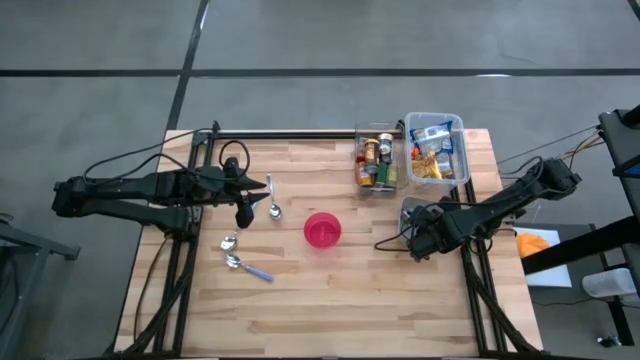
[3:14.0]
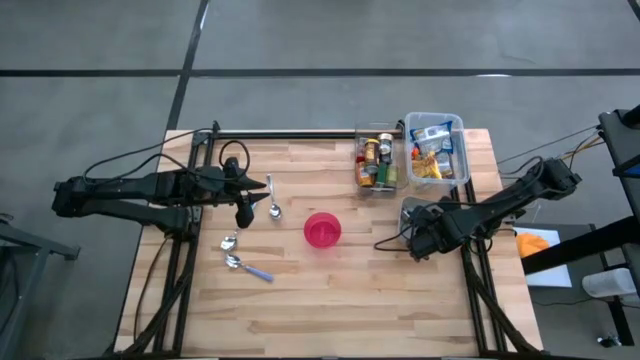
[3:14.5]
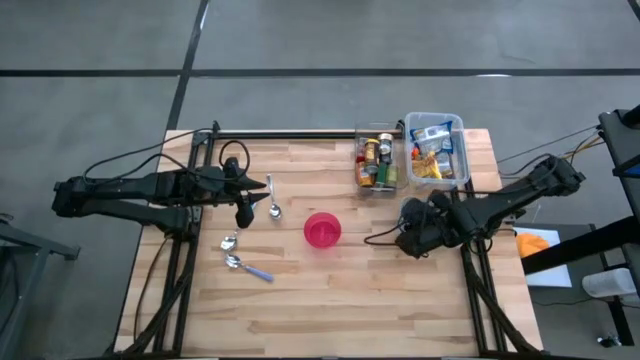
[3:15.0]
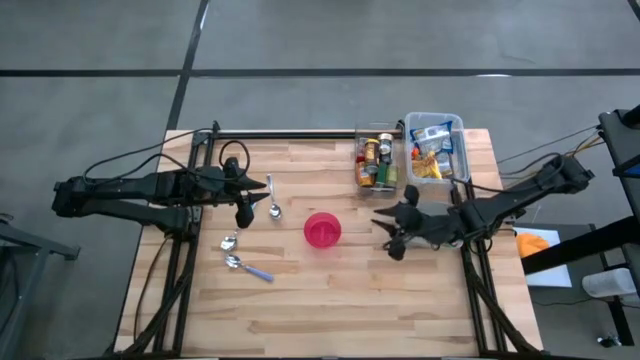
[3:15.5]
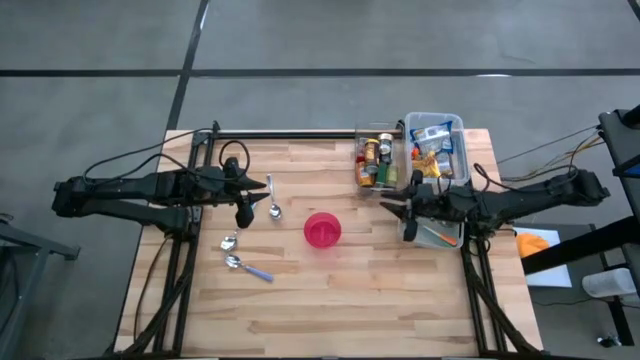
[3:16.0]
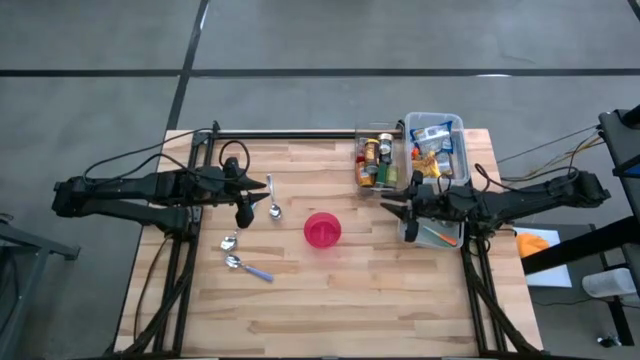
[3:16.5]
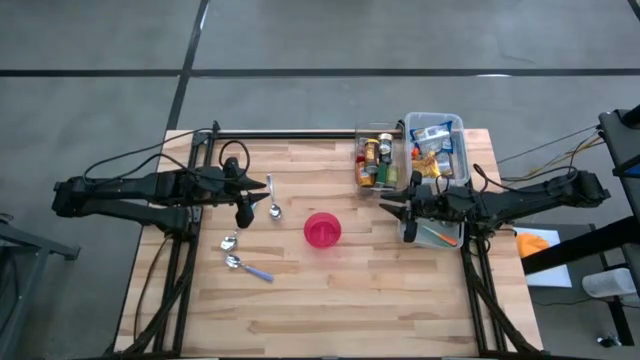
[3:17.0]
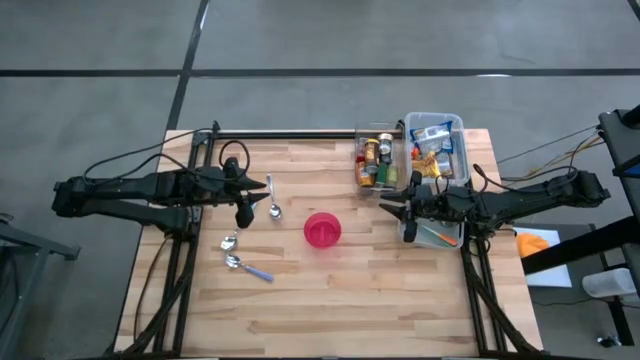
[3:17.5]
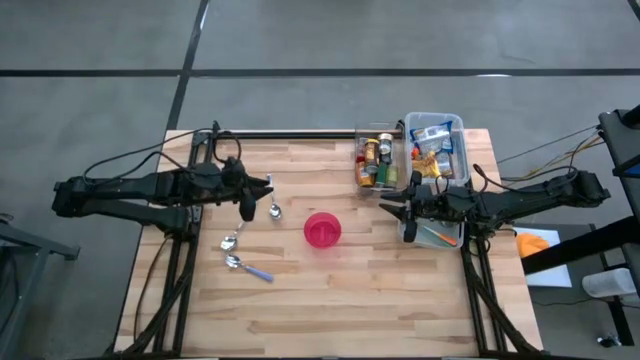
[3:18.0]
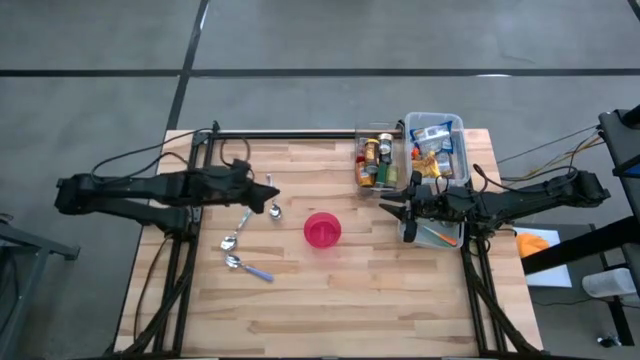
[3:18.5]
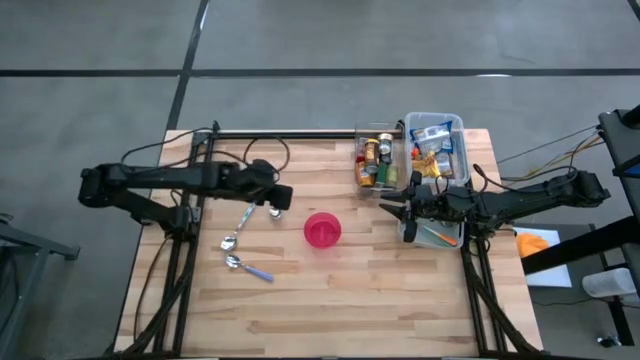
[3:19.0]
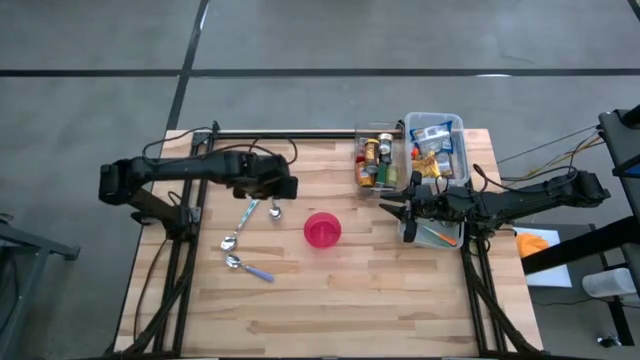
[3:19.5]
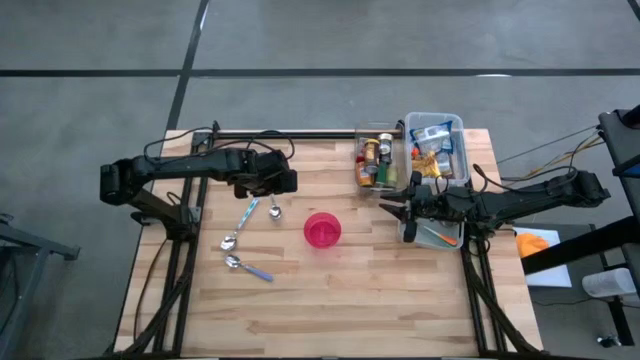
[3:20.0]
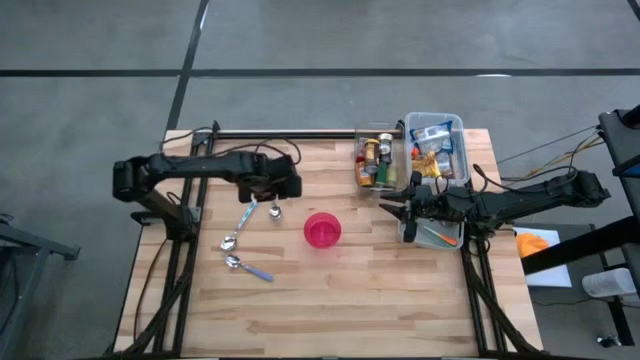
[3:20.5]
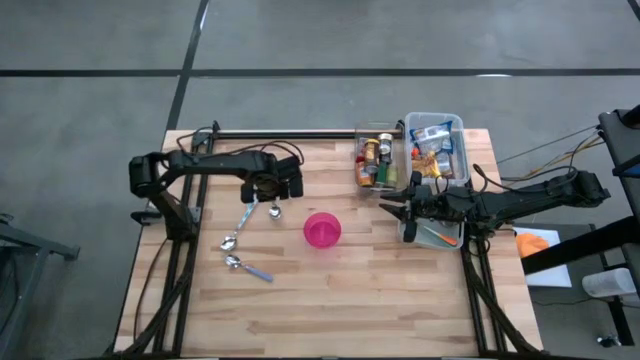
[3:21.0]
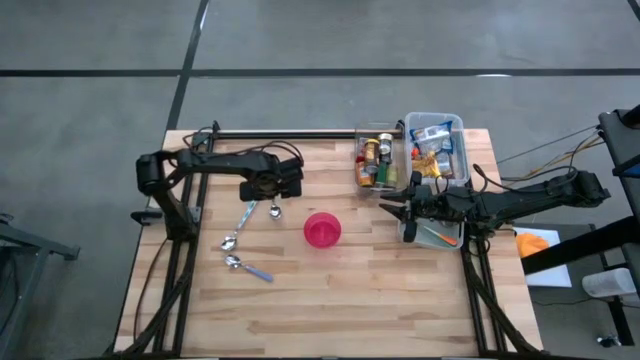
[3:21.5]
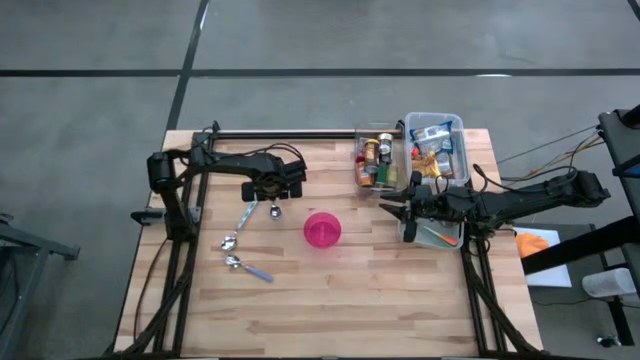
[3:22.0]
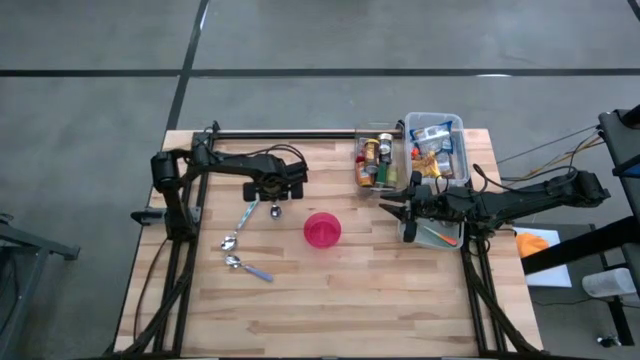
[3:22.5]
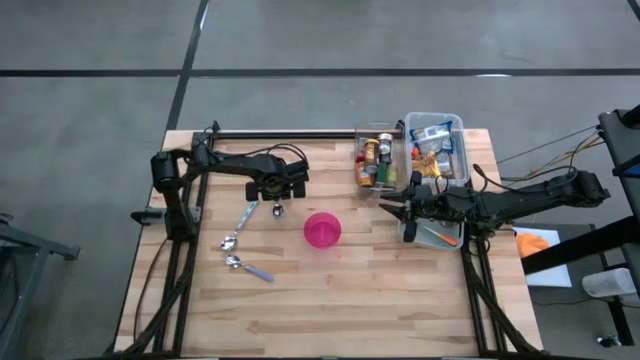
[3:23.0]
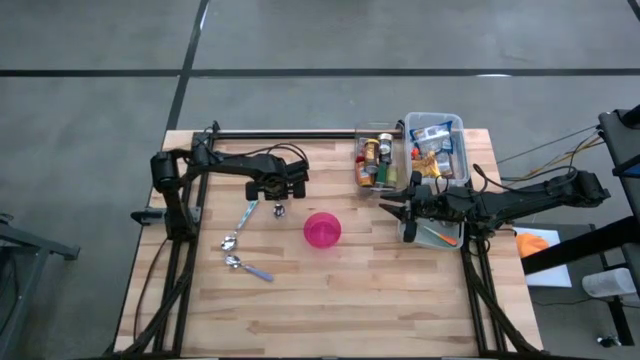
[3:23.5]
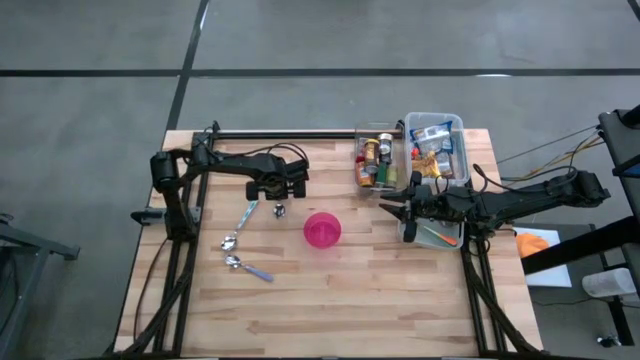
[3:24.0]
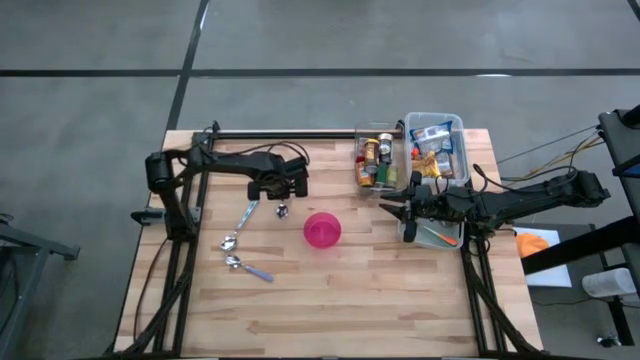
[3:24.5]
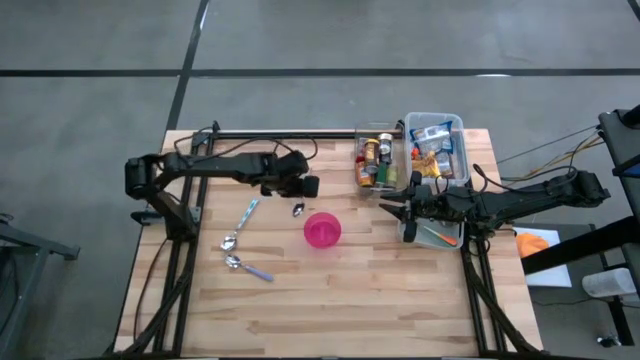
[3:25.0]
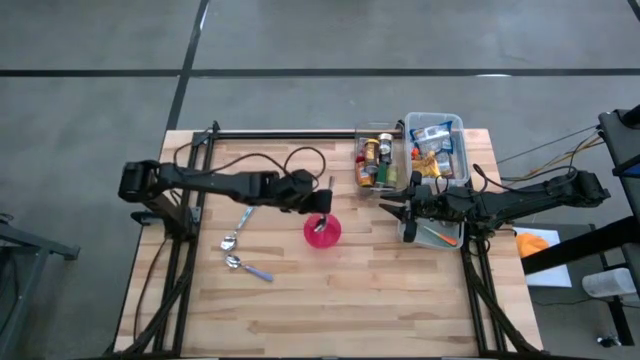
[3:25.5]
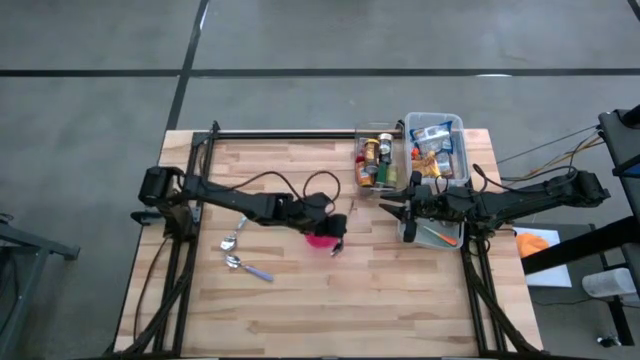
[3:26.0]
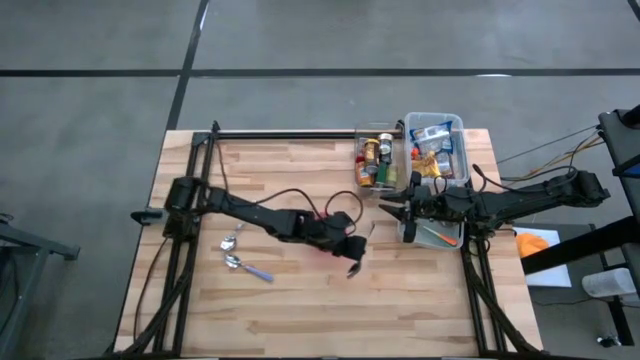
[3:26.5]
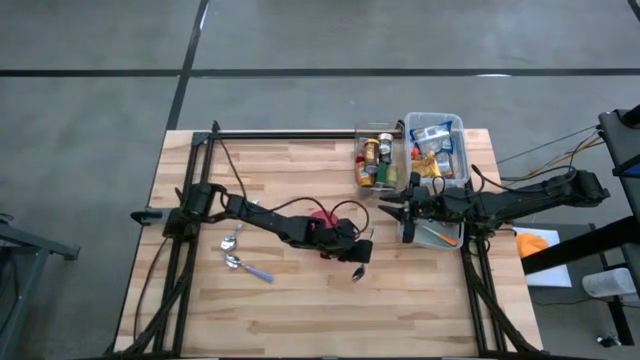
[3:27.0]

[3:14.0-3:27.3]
Put the silver spoon into the gray bin
